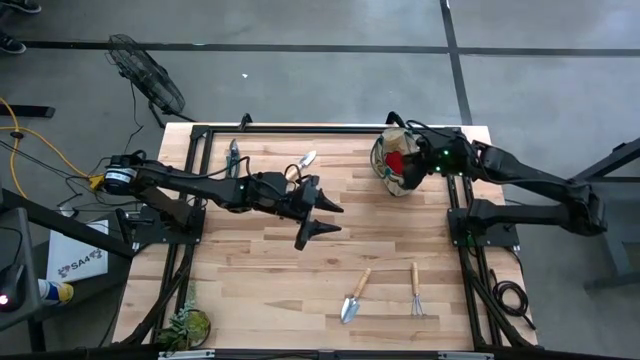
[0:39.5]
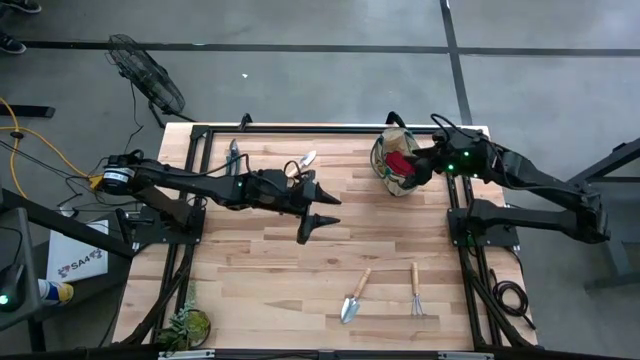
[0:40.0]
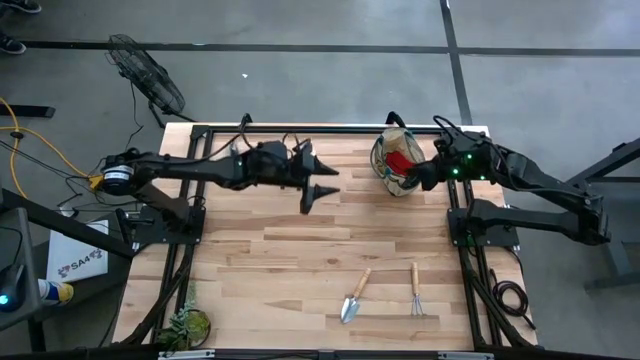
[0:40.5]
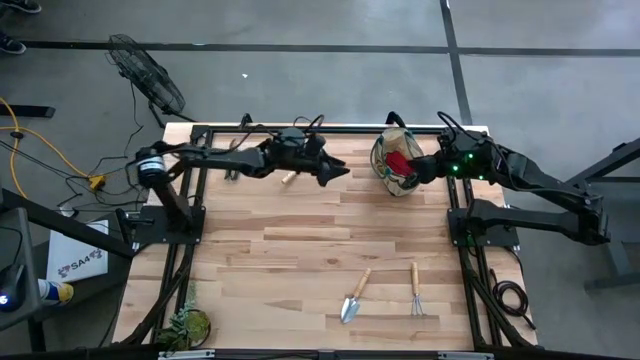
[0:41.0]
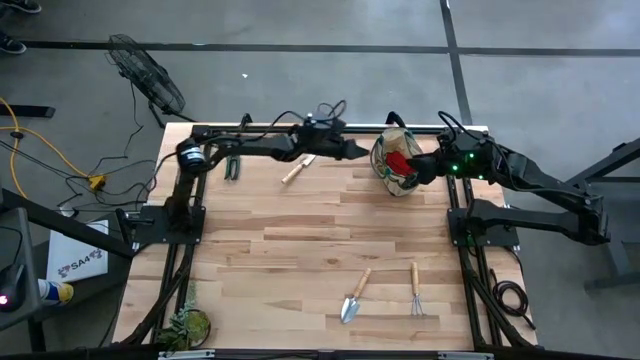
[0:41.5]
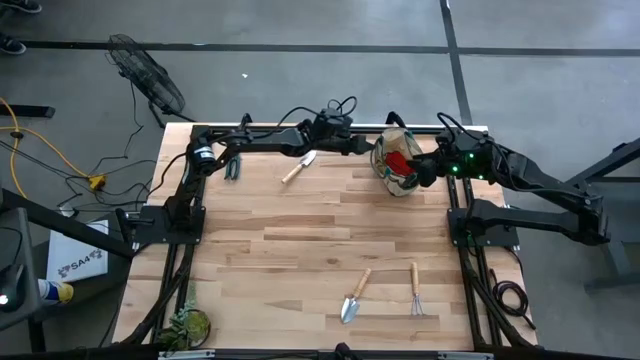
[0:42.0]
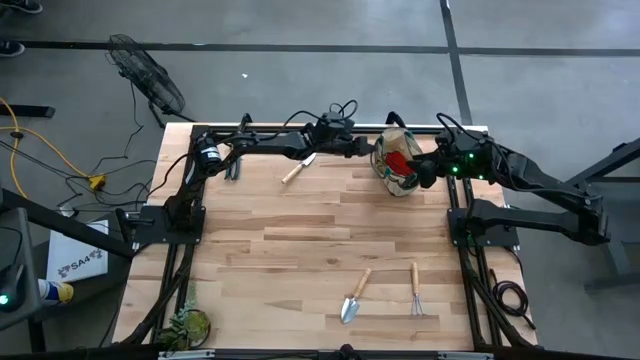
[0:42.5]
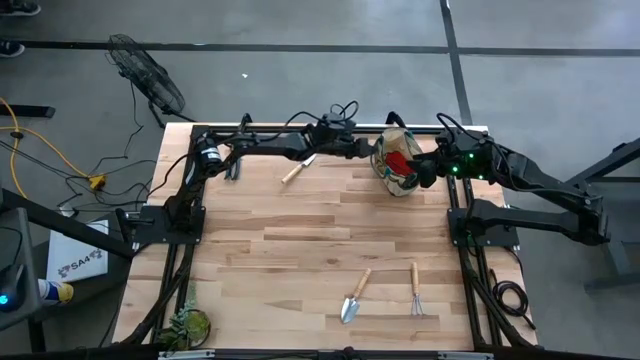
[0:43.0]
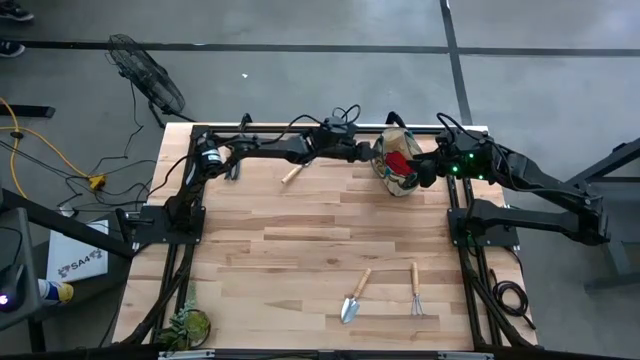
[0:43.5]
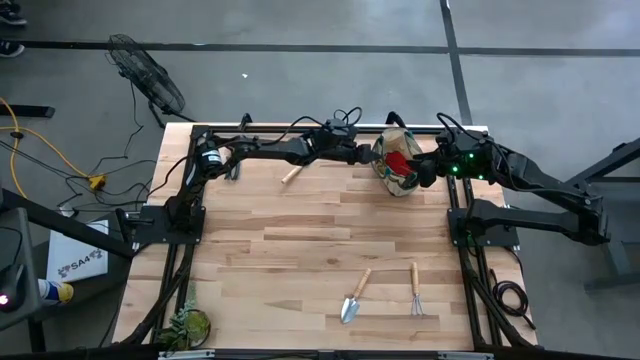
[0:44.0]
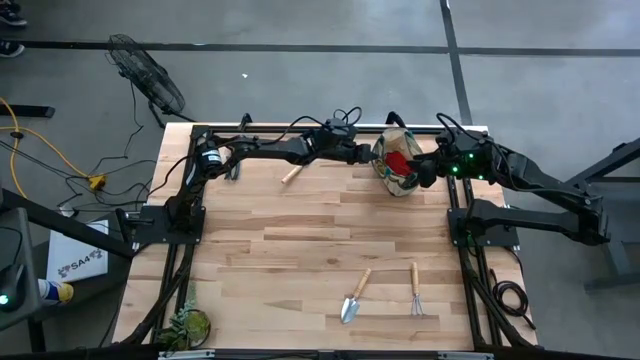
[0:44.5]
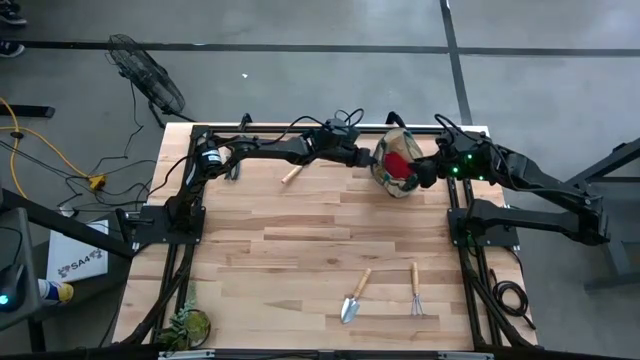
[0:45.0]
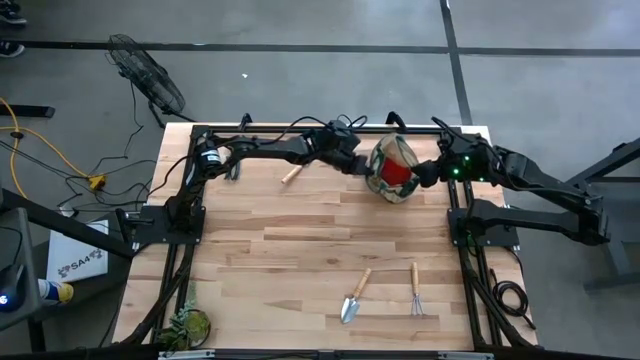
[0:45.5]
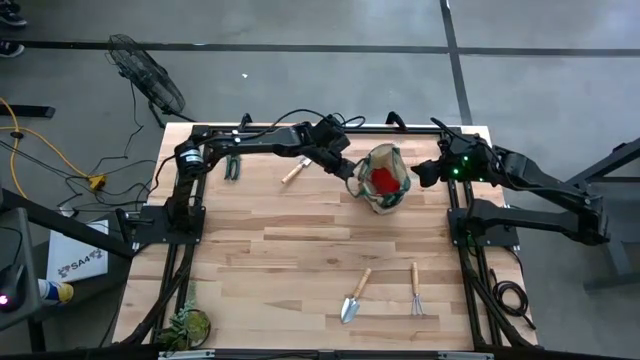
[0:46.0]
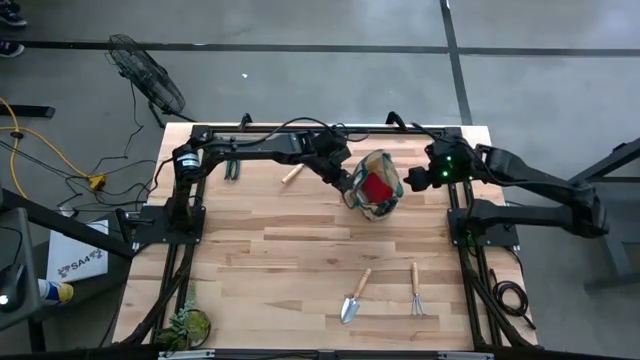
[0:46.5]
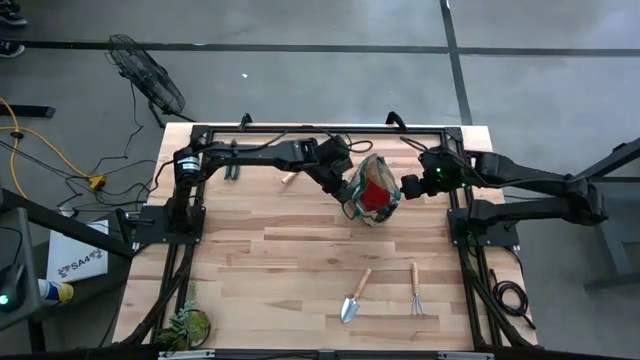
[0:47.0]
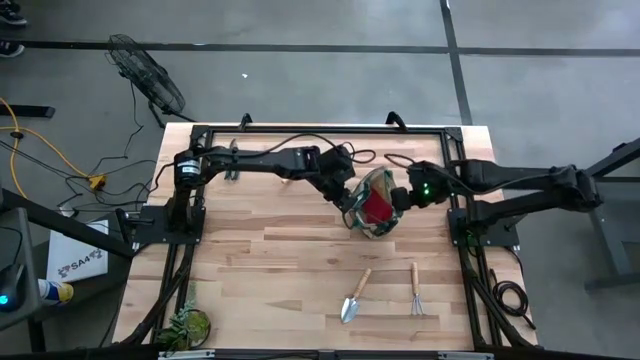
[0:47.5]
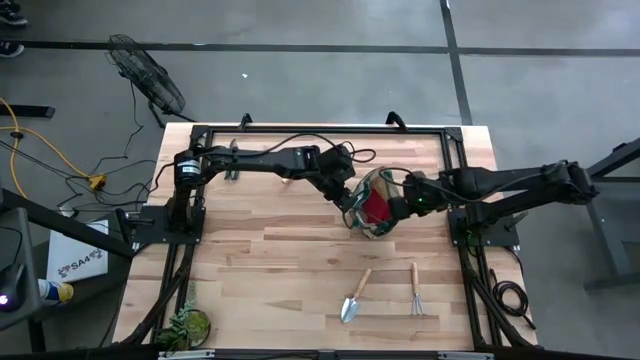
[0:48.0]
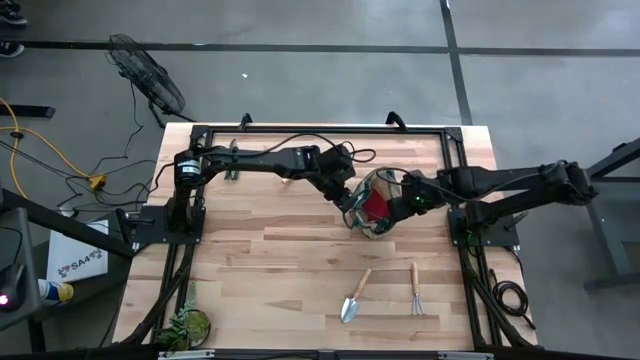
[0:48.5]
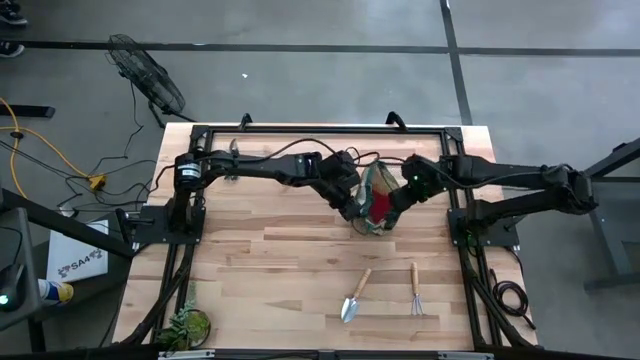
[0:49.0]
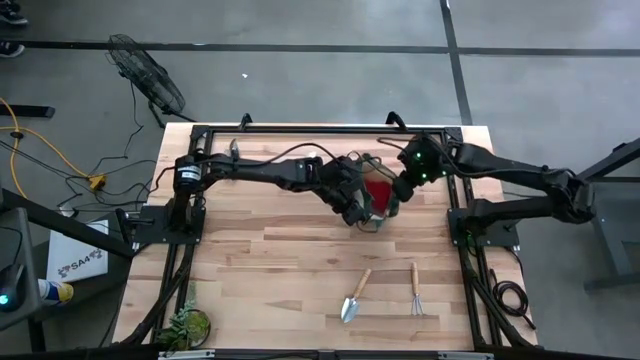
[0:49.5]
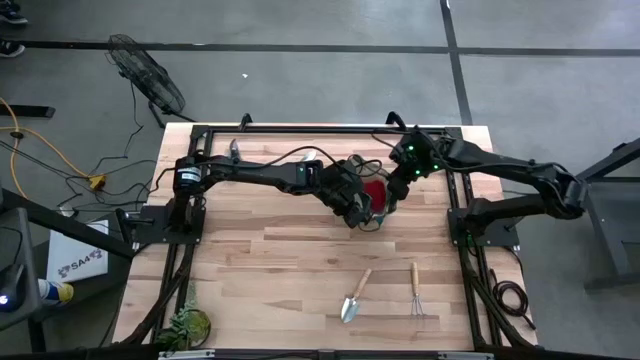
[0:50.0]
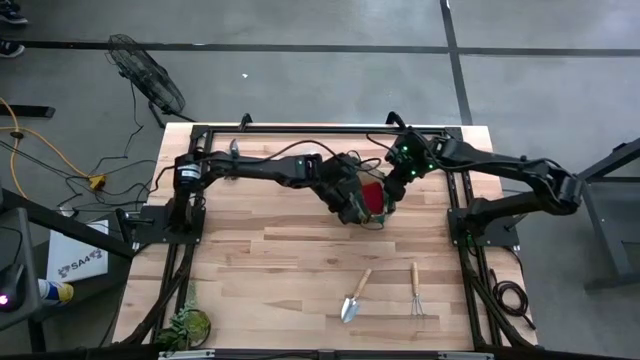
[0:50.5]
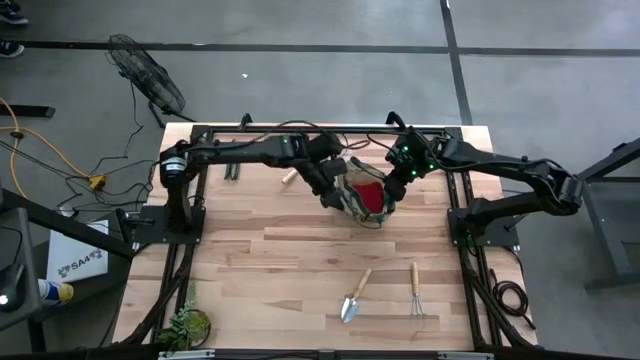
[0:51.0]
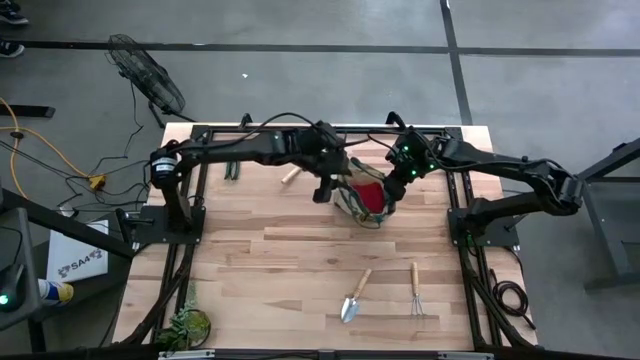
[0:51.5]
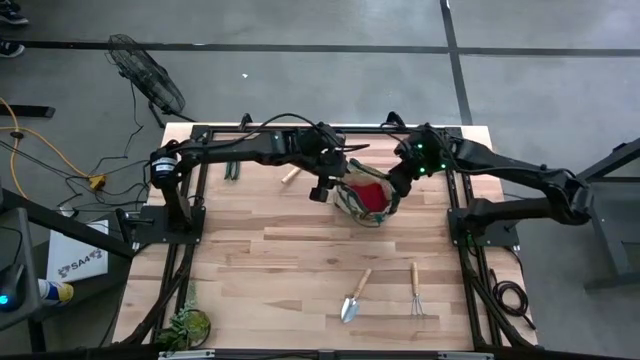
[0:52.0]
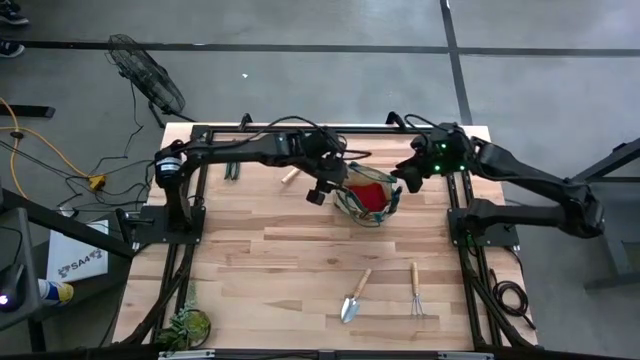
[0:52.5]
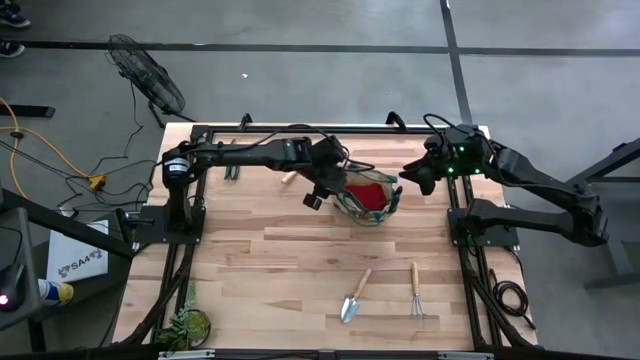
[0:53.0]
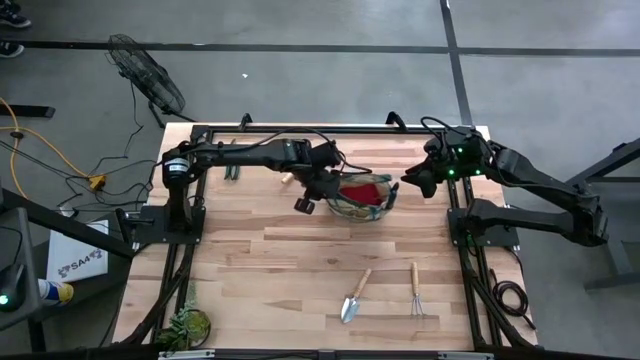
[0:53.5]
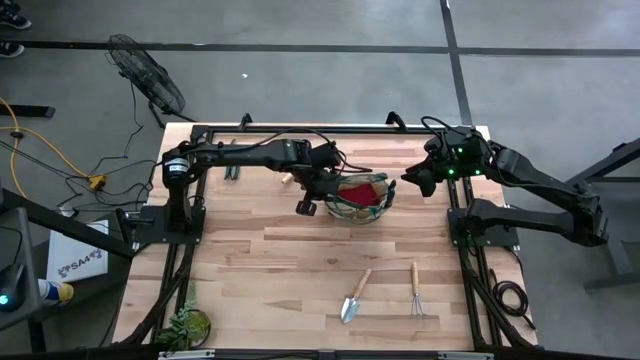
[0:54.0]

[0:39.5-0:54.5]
Task: Pick & Place Garden tools in Gardening bag
Adjust the gardening bag
